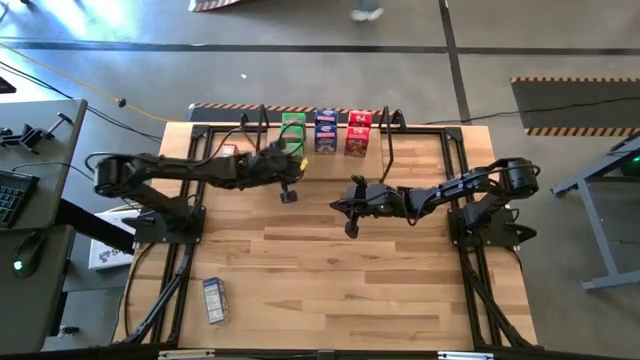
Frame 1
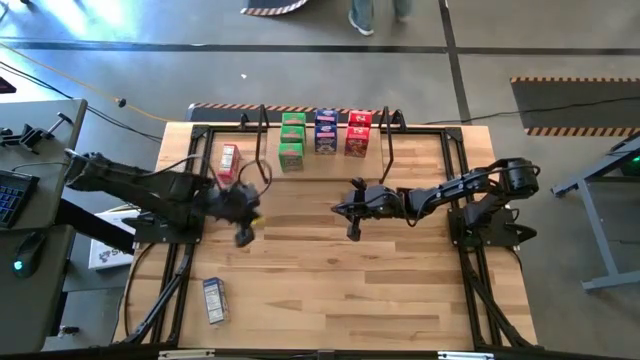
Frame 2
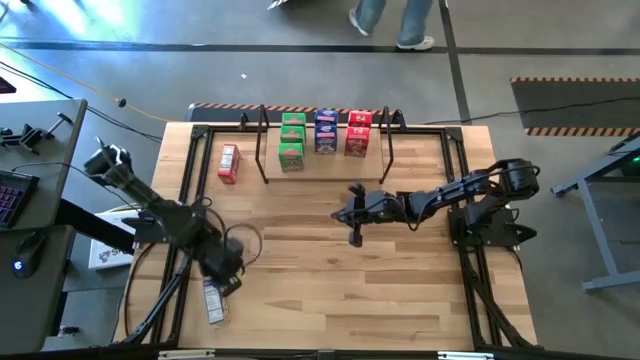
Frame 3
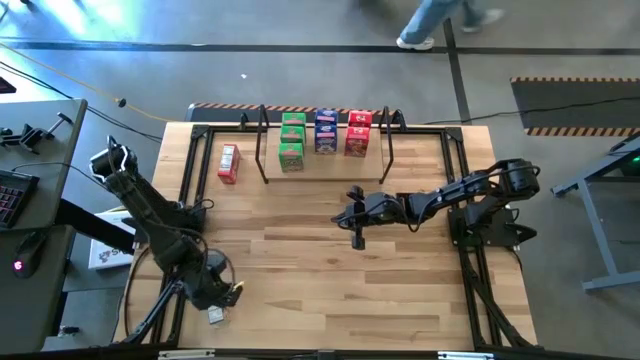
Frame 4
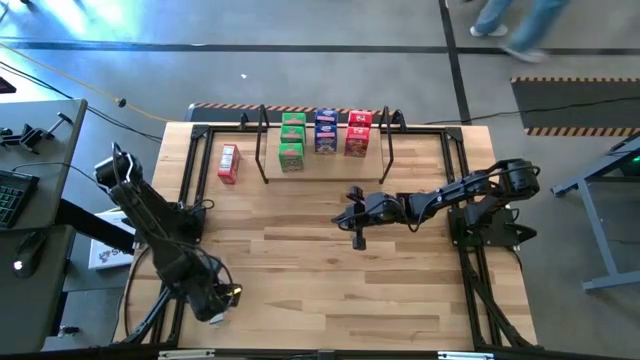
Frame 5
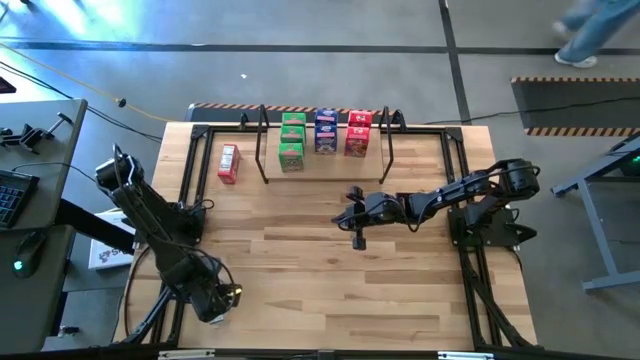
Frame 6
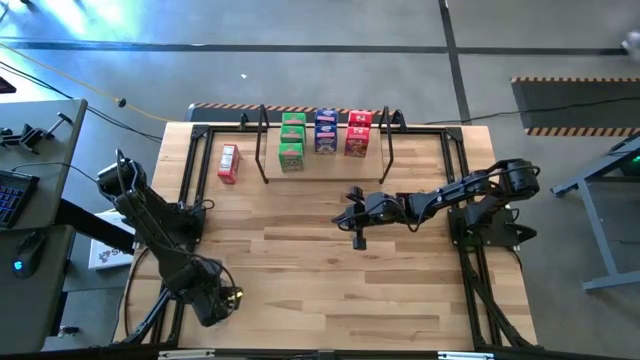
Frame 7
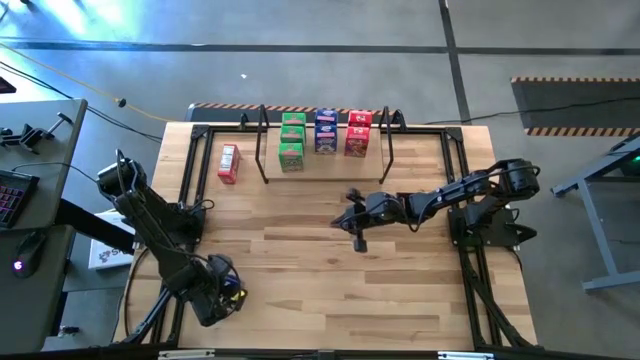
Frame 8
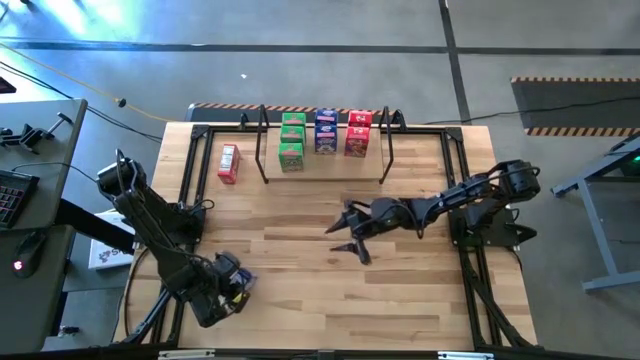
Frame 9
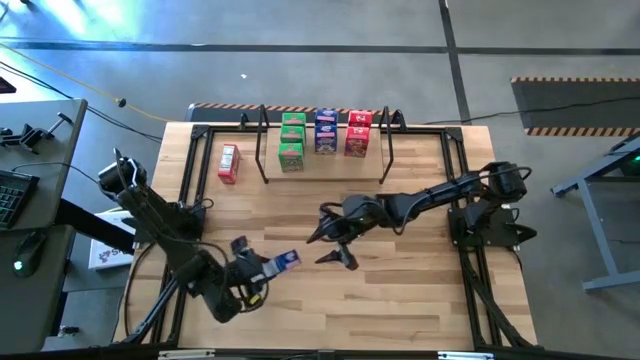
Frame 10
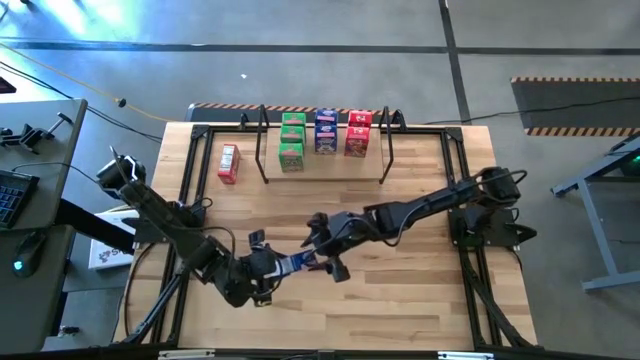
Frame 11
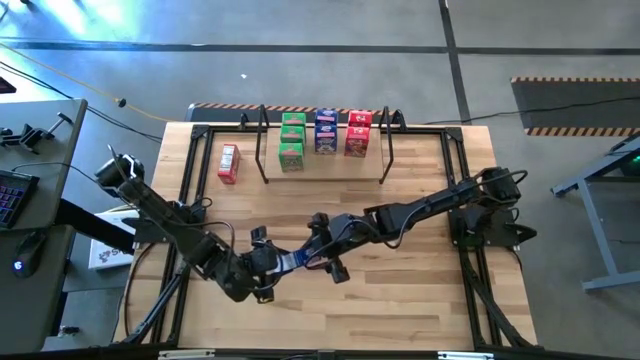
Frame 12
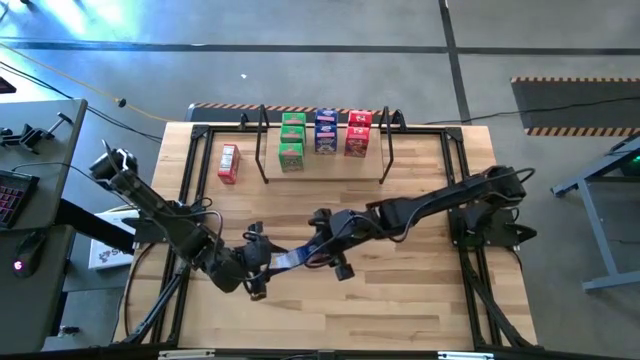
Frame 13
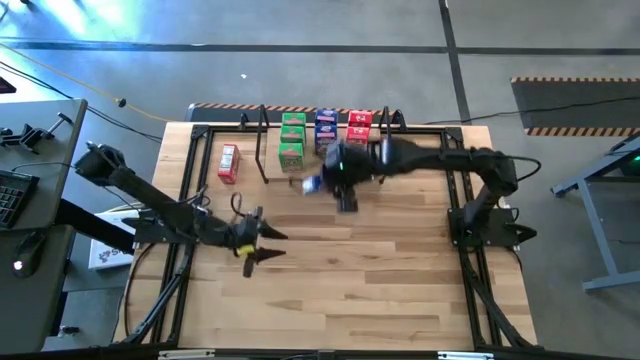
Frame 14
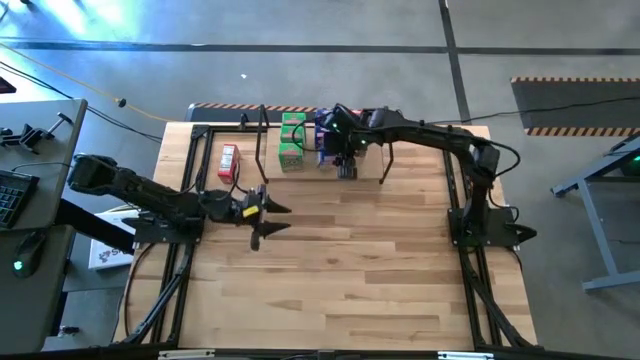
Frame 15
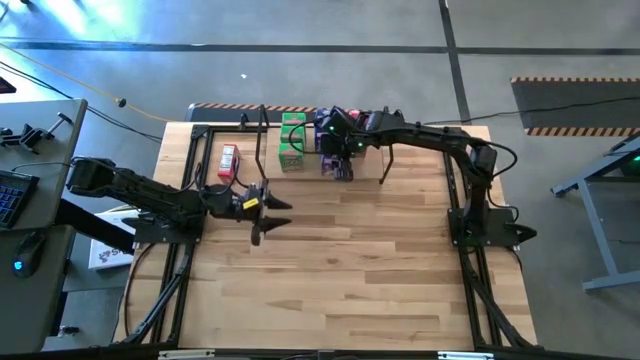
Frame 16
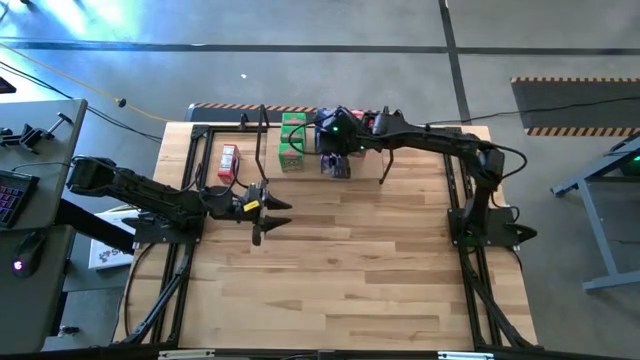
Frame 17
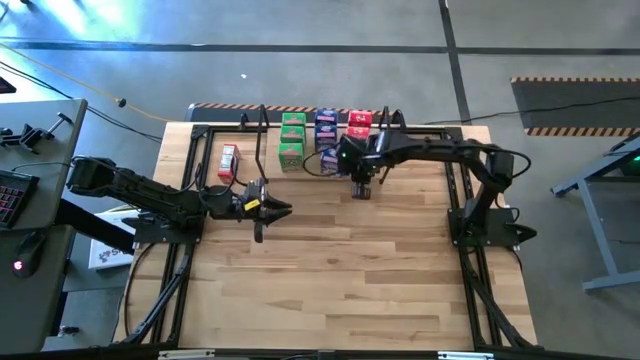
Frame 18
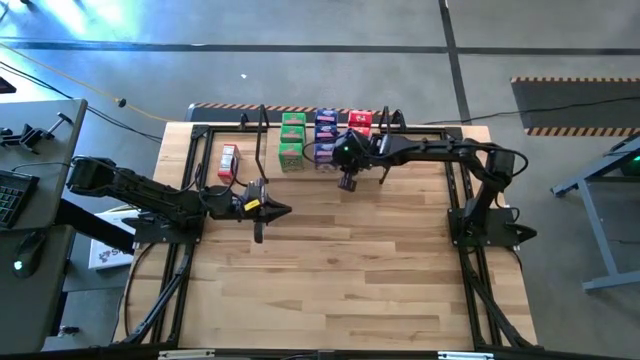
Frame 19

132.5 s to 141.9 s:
Task: Stack cereal on shelf
Put the blue cereal box on the shelf aligned with the blue cereal box

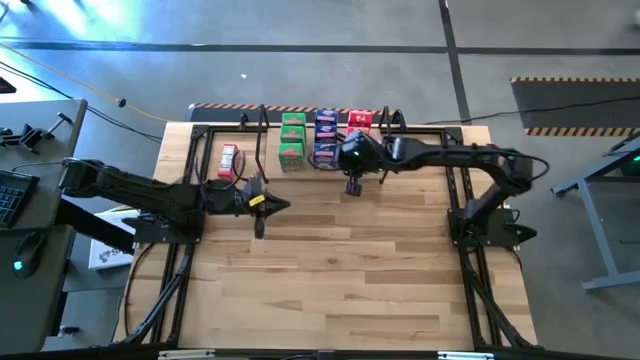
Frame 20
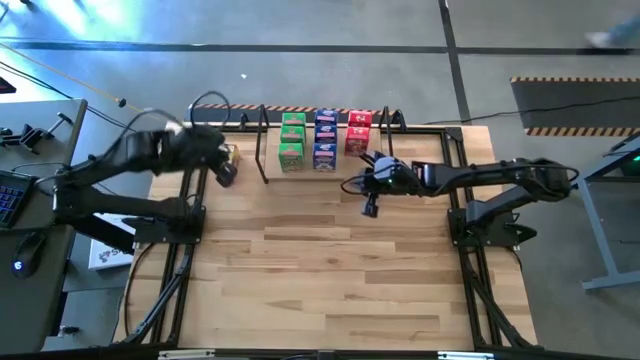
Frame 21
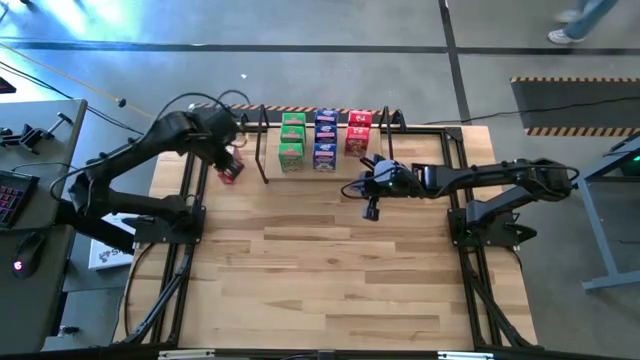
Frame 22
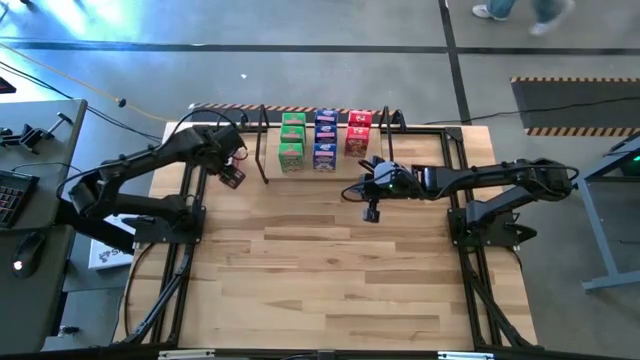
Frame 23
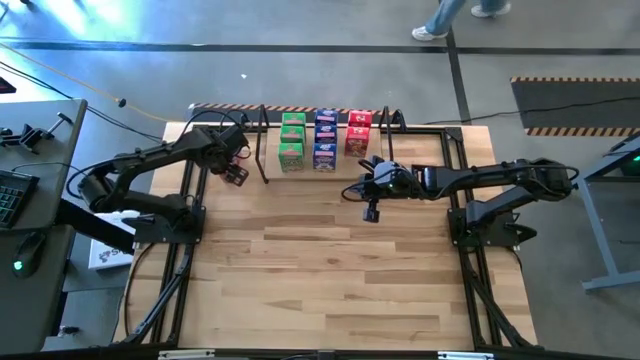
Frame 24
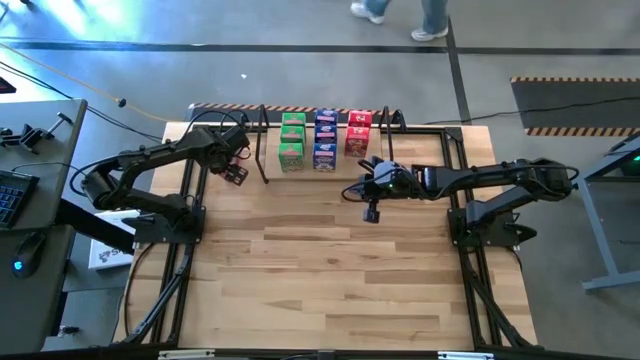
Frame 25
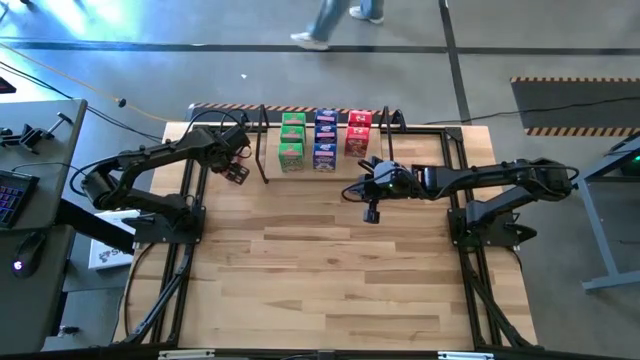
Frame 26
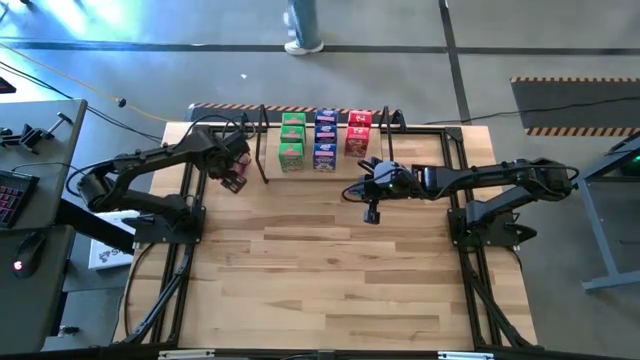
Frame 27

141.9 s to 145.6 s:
Put the red cereal box on the shelf aligned with the red cereal box

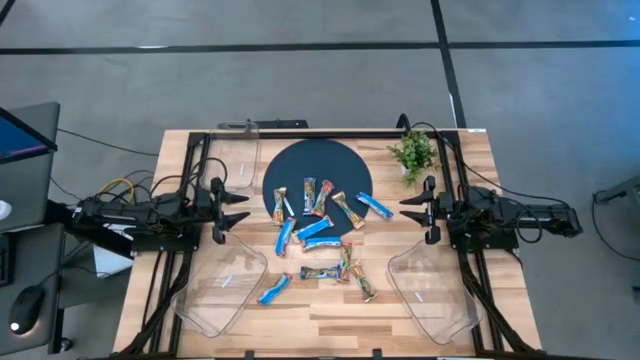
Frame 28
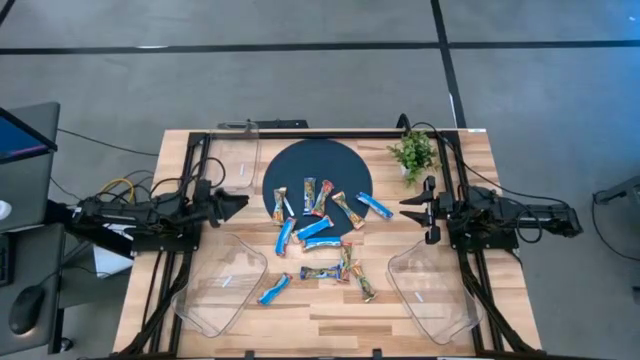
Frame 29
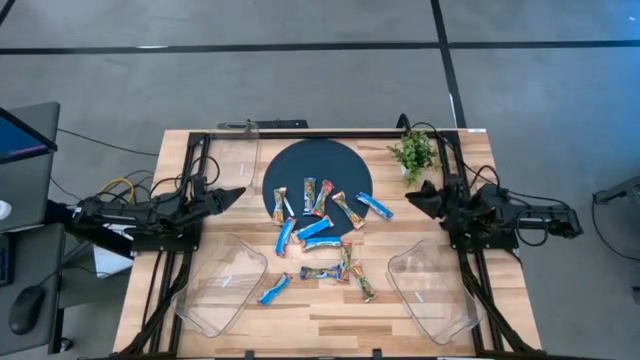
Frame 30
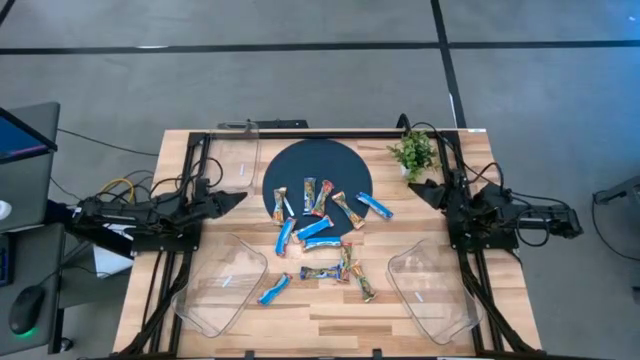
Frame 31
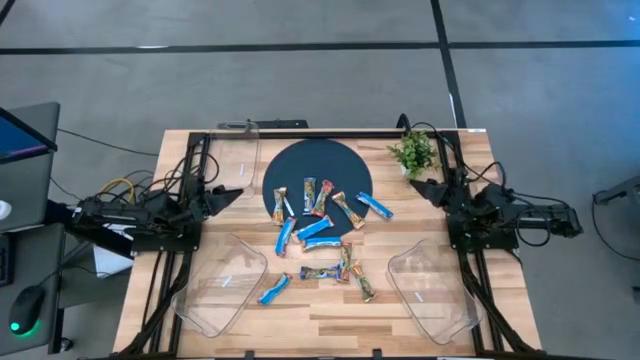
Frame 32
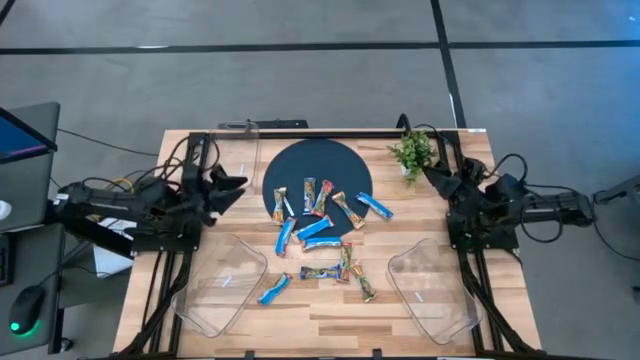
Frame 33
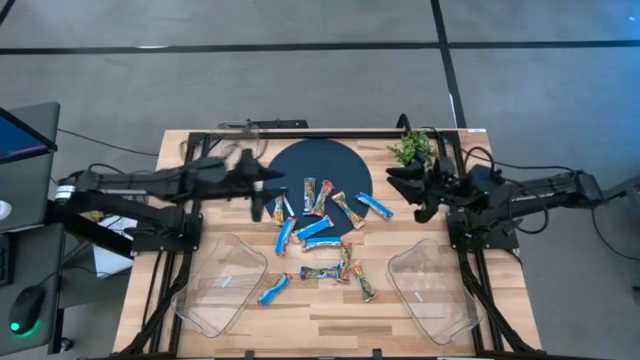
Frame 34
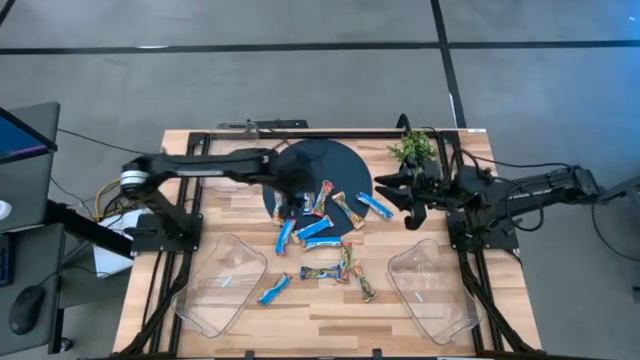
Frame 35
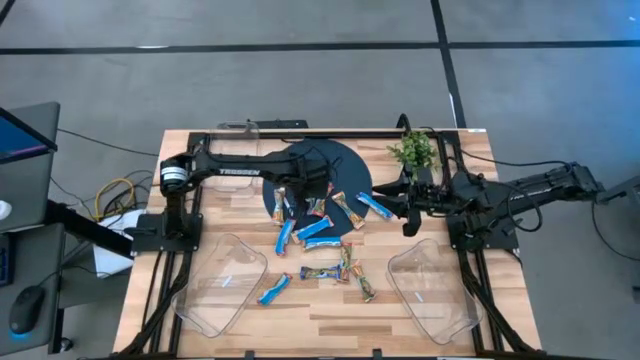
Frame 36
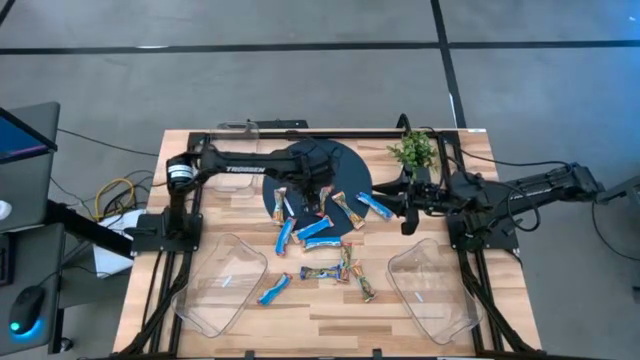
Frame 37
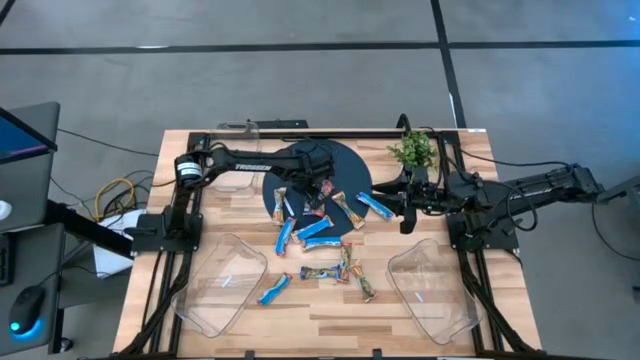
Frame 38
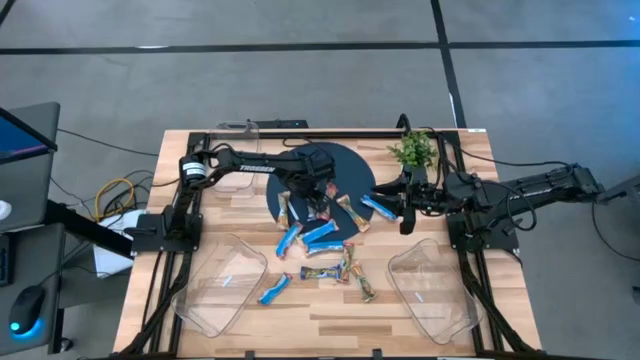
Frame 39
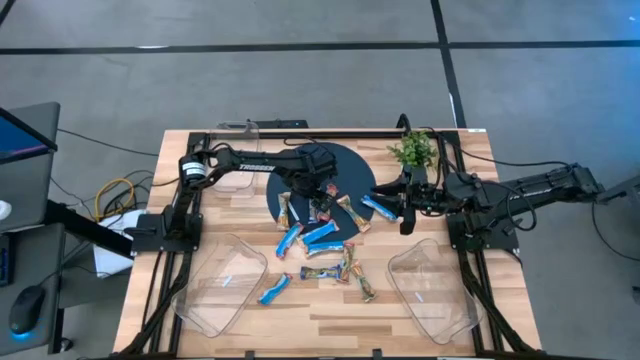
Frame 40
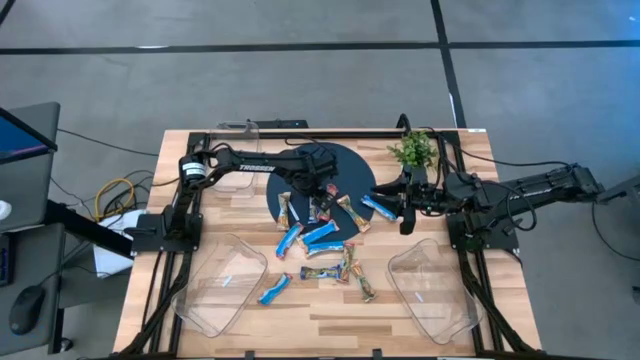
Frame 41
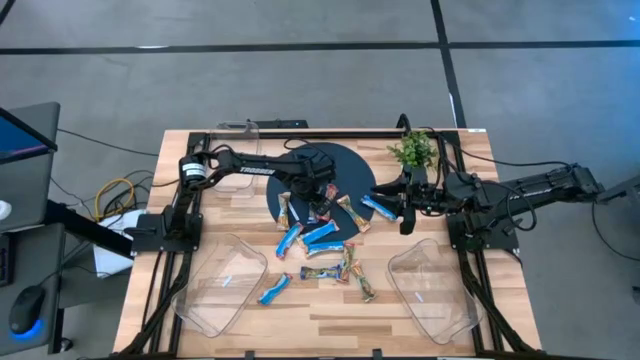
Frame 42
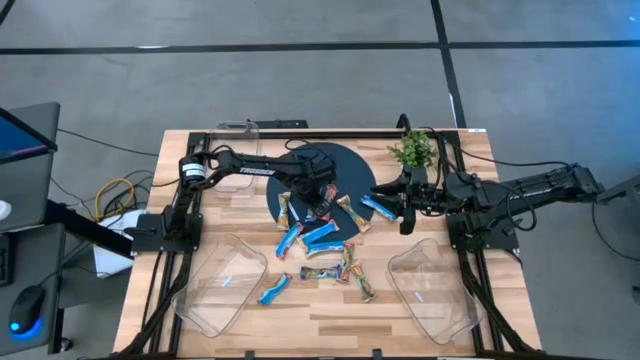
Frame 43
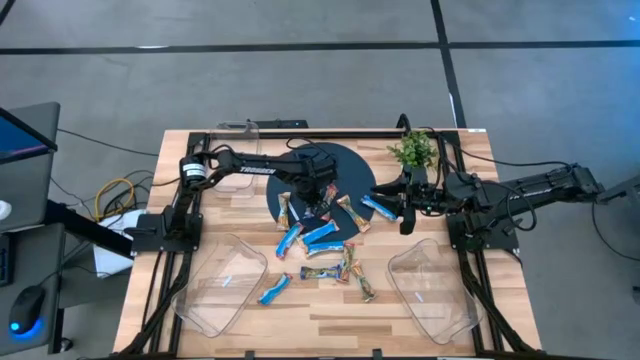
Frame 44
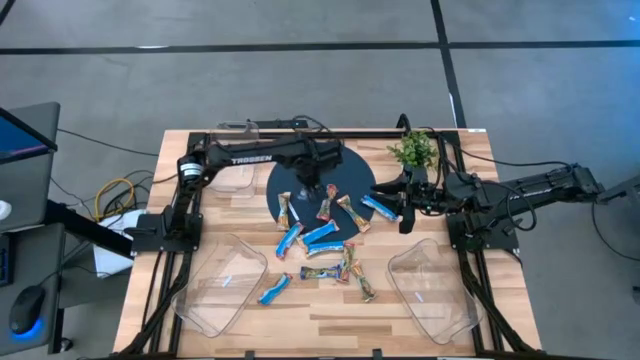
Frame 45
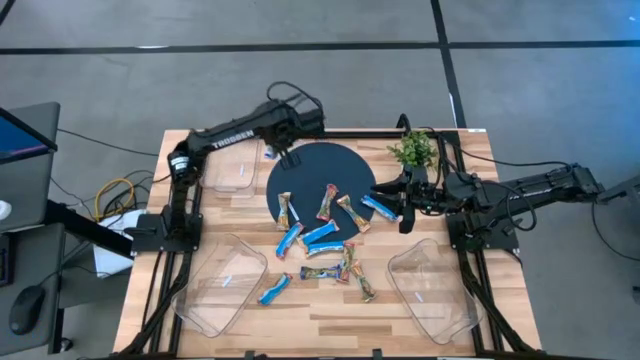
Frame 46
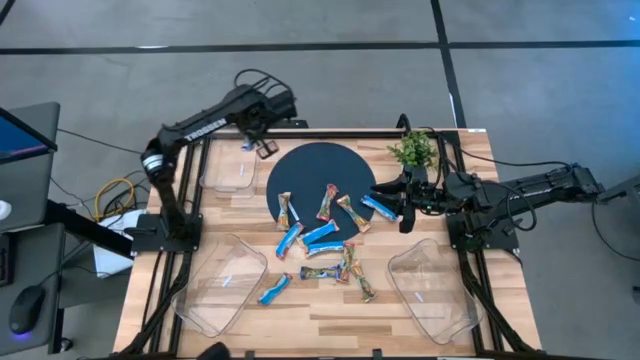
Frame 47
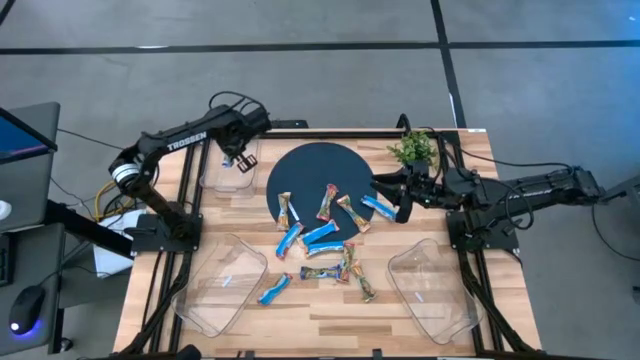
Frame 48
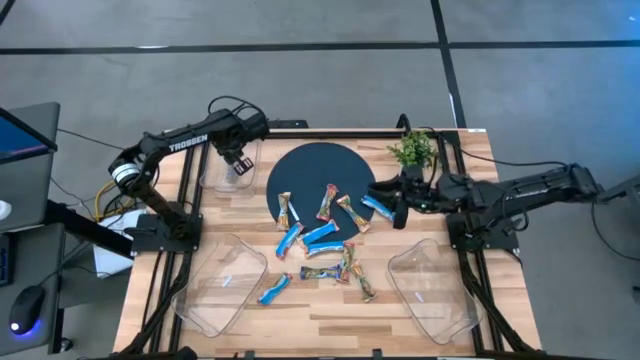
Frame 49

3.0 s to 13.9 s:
Task: Pick and place Granola Bars by type
Put the blue granola bar into the top transparent bin
